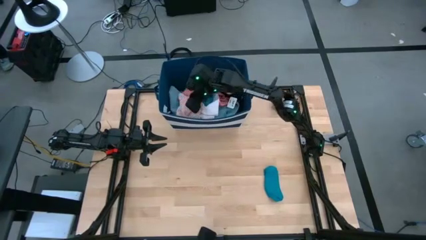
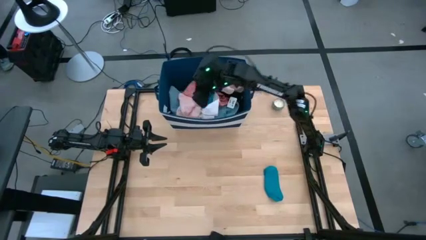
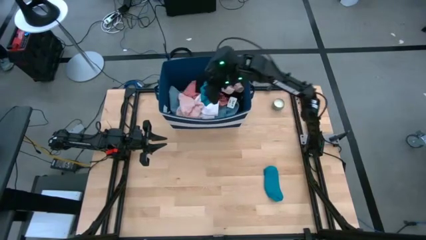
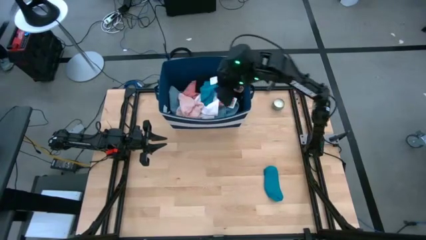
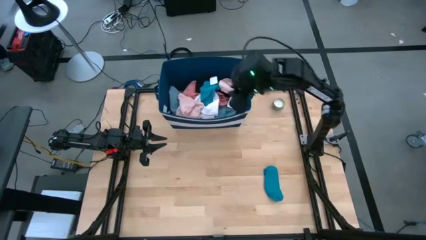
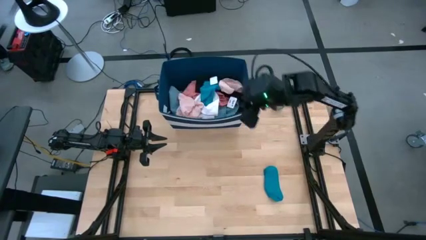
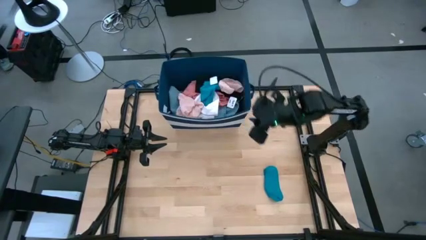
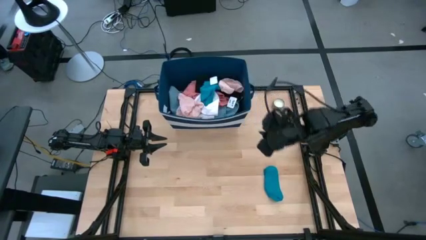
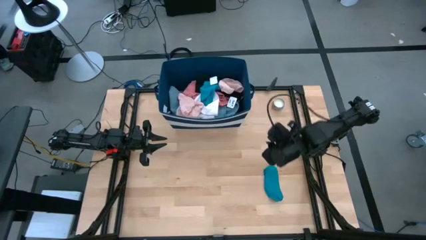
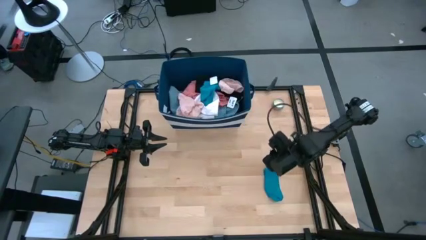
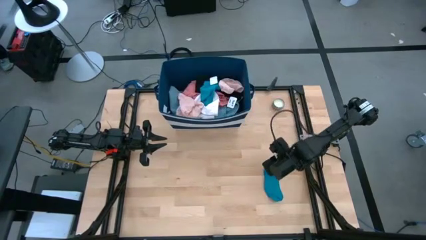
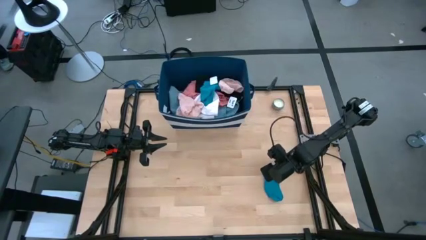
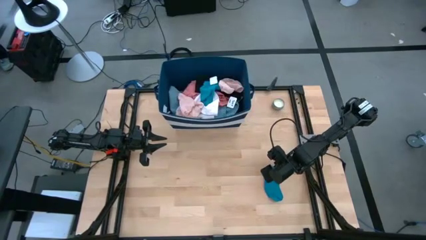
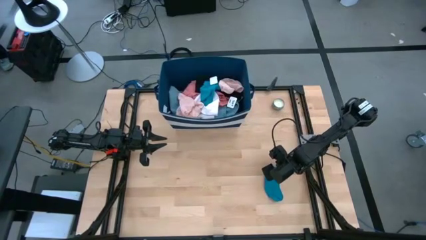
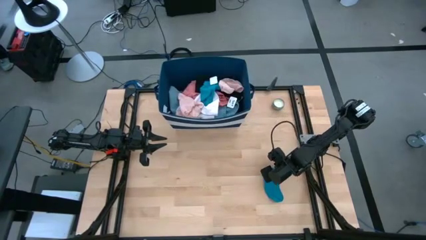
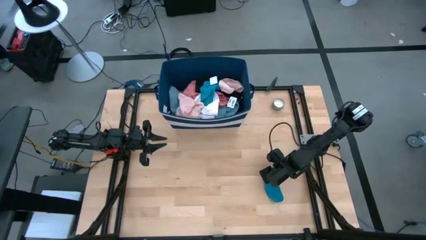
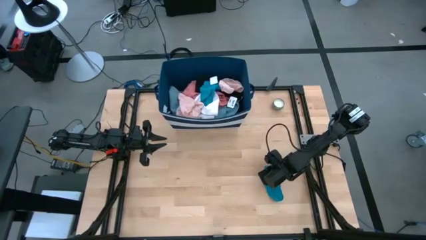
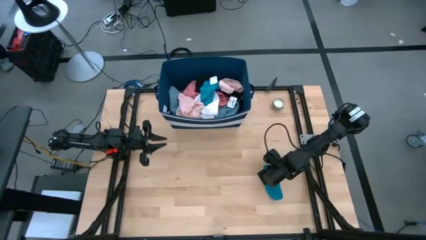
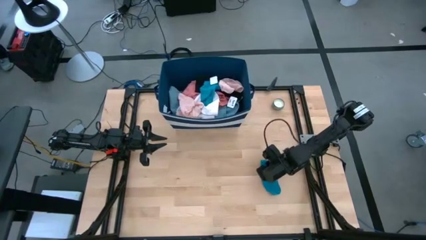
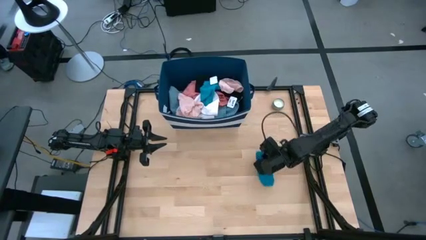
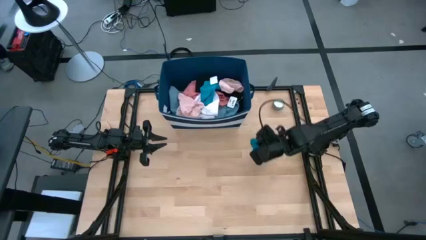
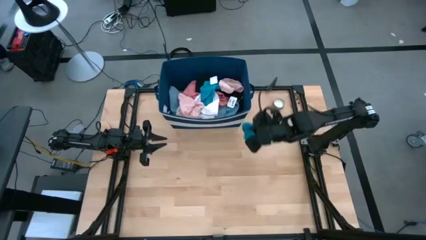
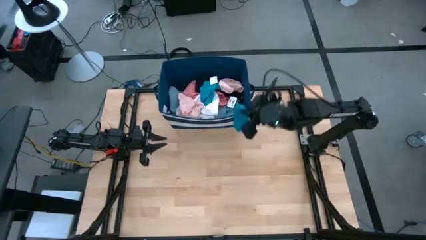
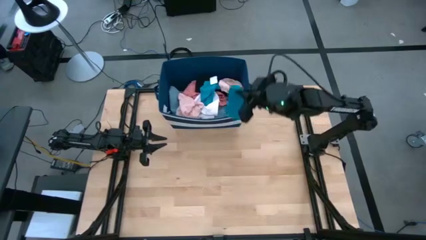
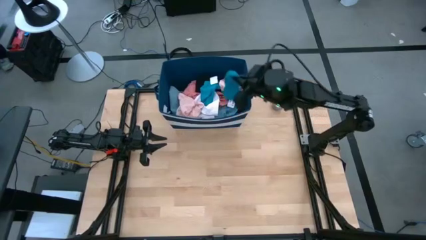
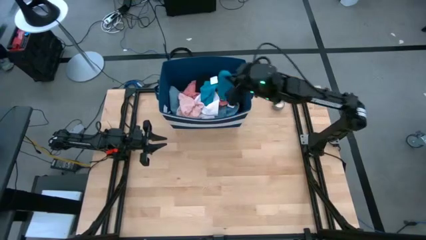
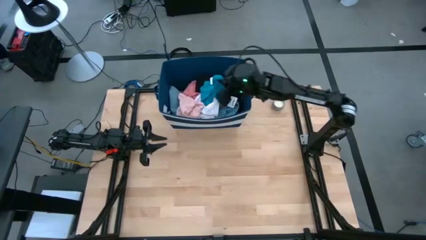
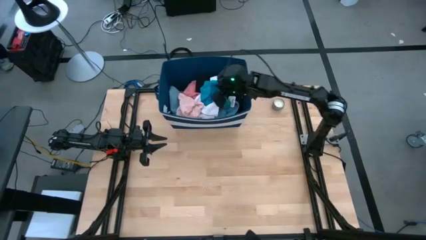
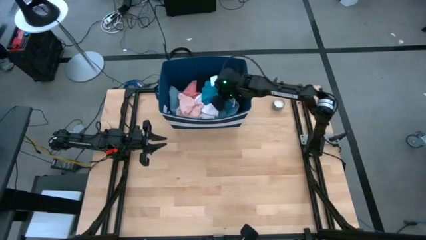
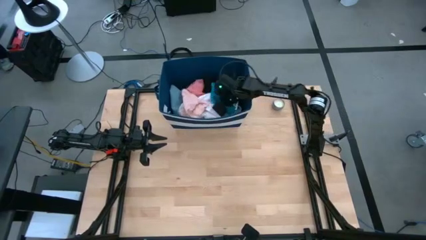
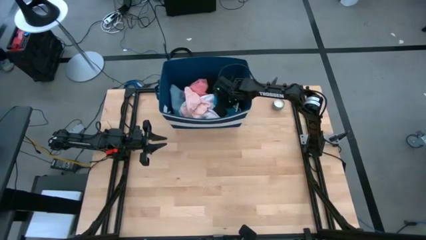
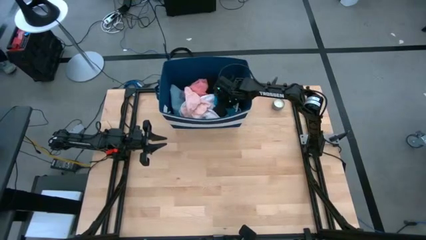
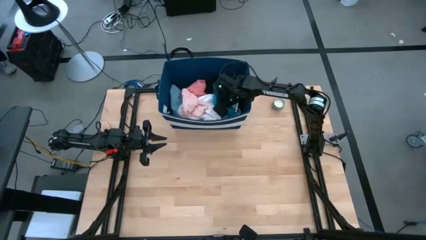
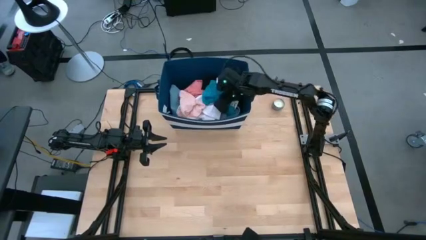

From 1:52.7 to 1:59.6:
Task: Sort clothes
Put the blue sock into the blue bin

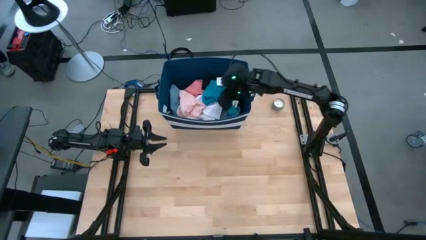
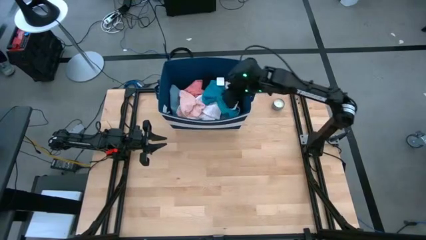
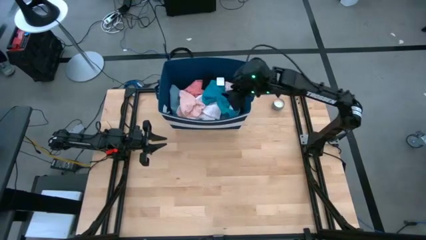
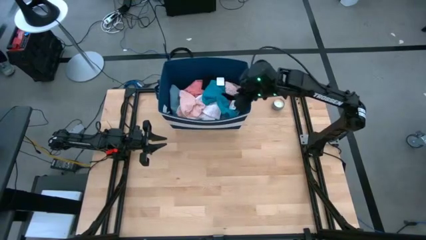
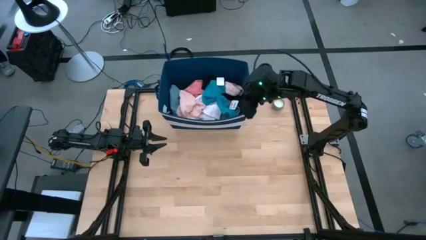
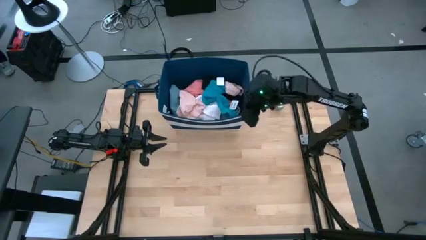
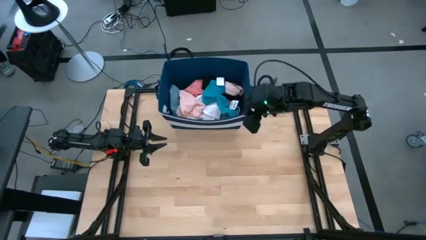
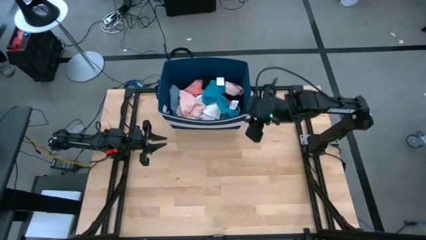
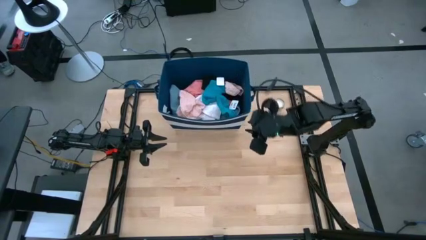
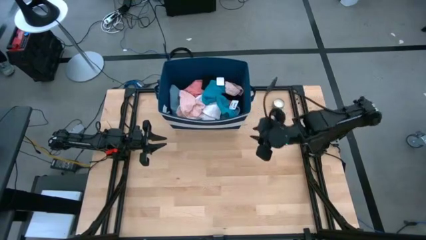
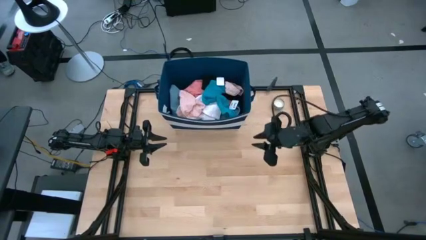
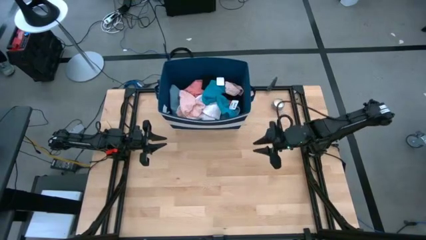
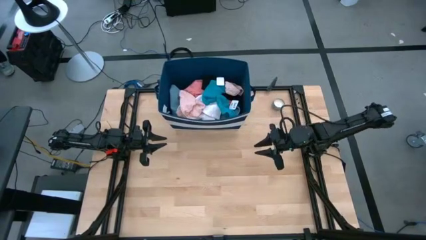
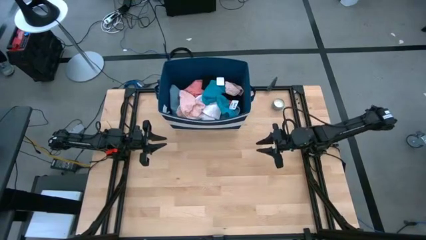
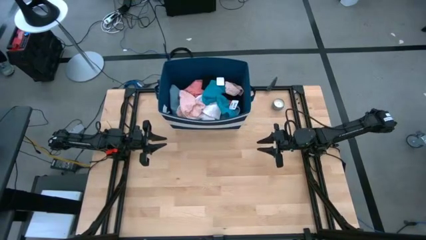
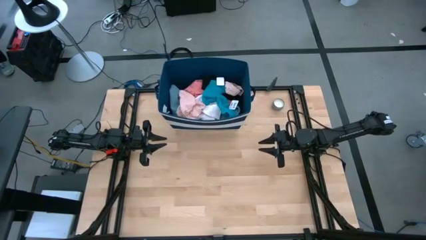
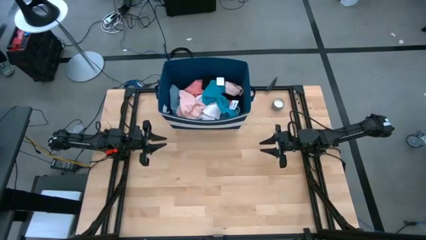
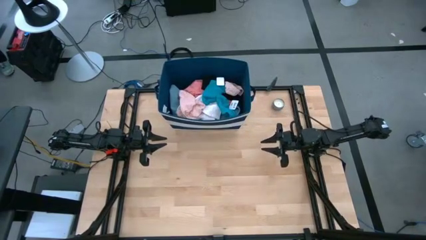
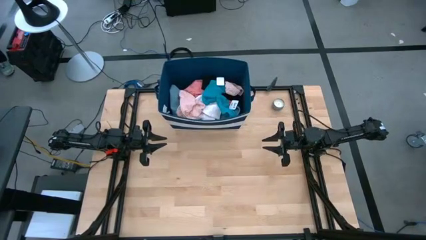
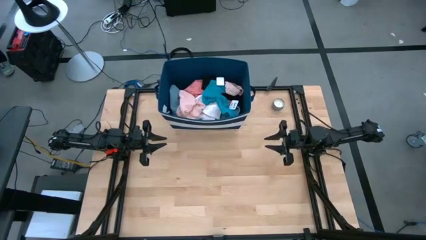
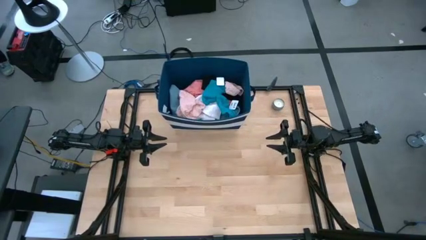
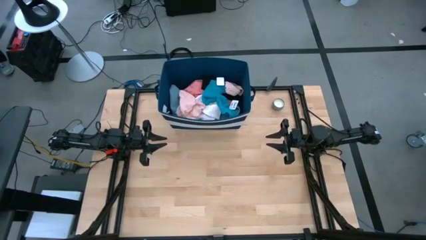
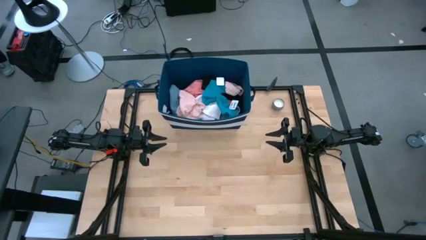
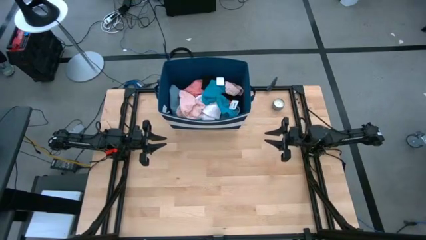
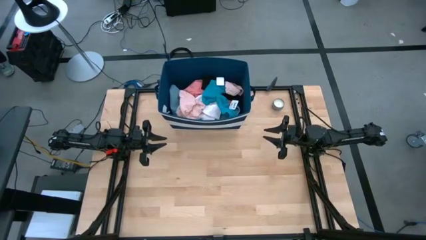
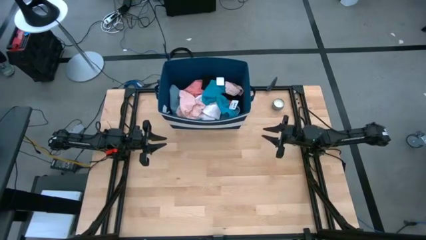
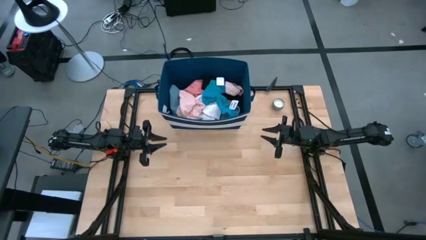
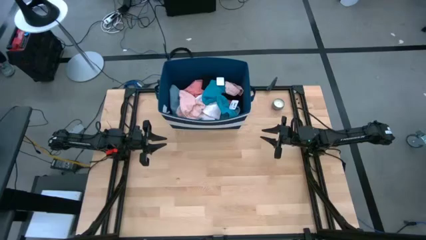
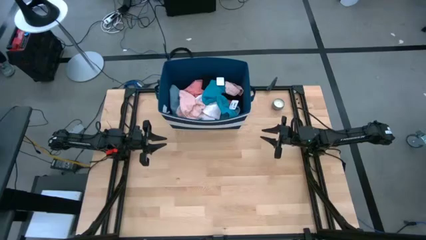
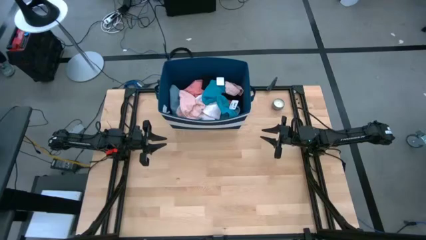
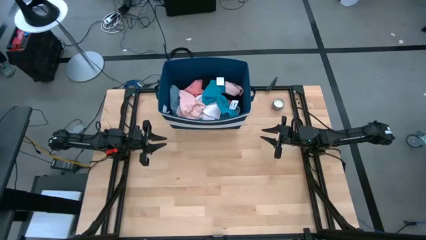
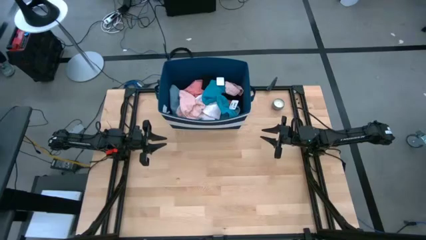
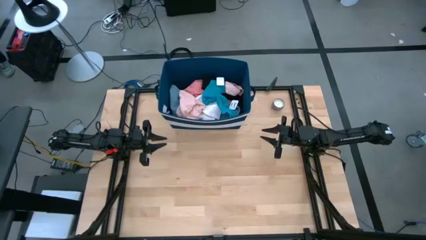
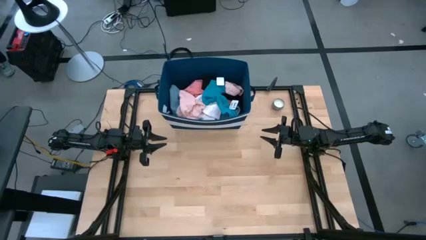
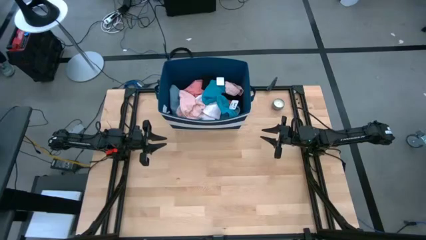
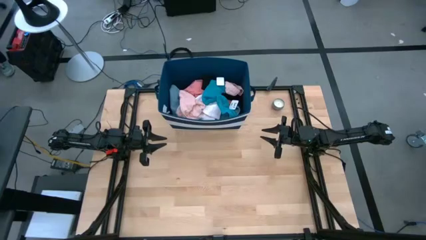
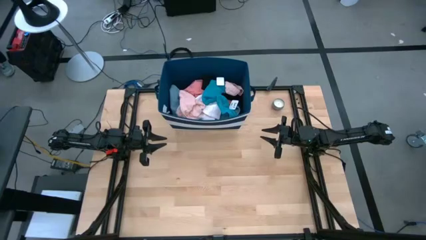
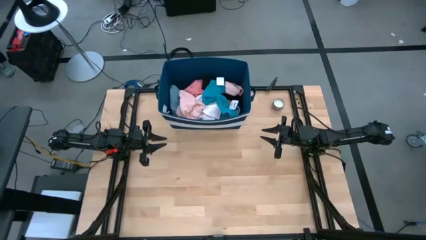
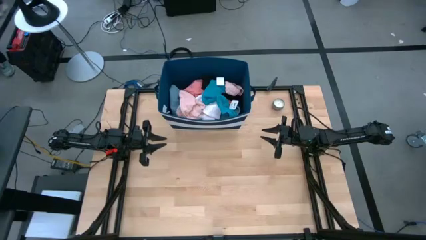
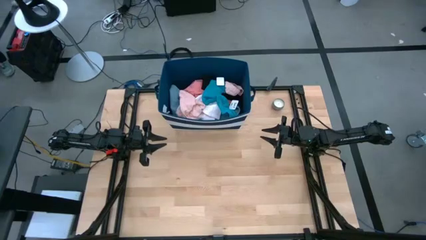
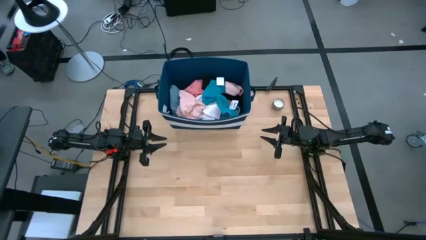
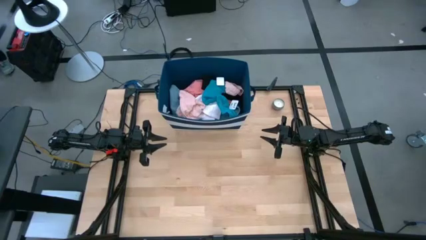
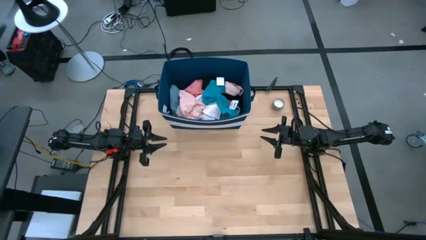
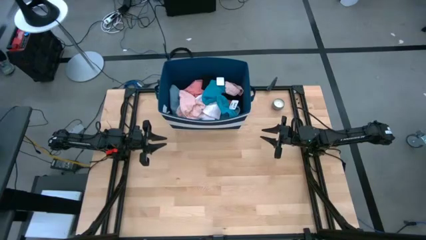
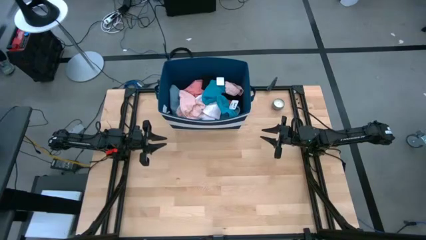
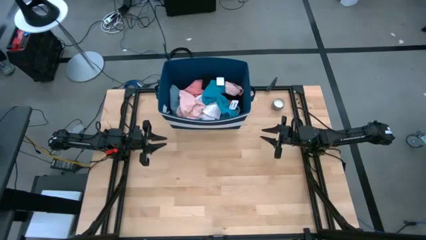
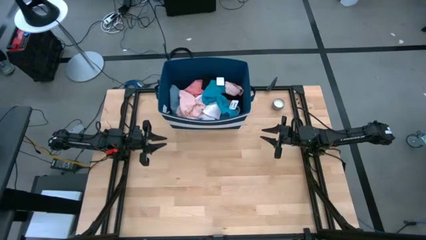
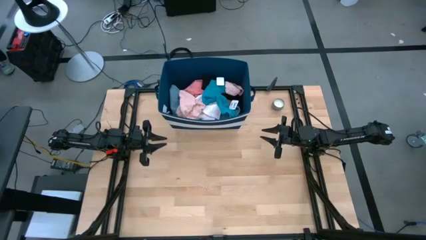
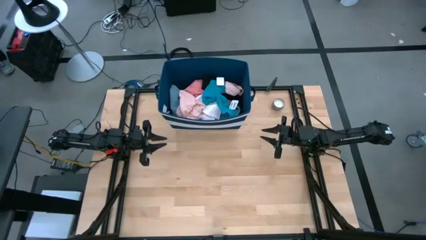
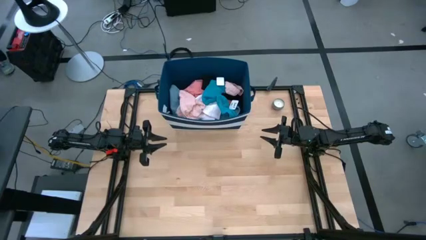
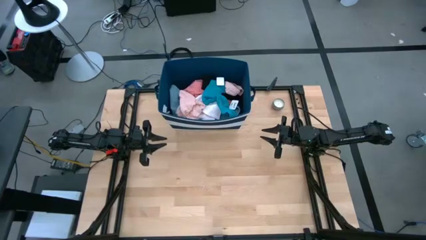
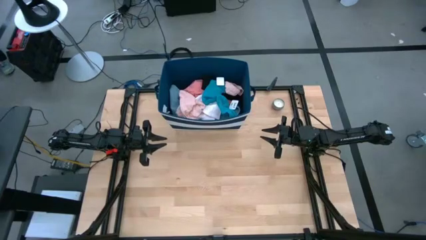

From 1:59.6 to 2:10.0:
Return to Home Position
